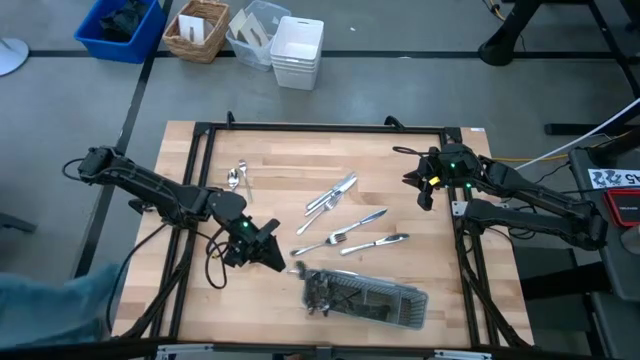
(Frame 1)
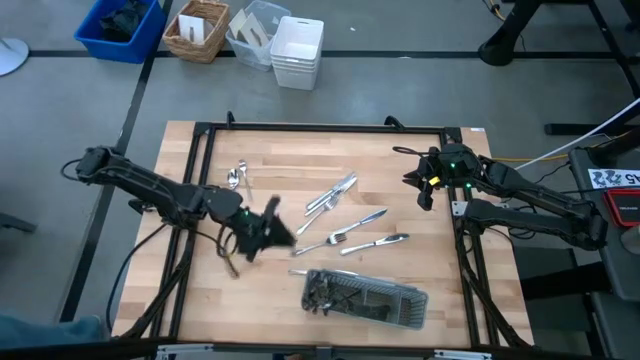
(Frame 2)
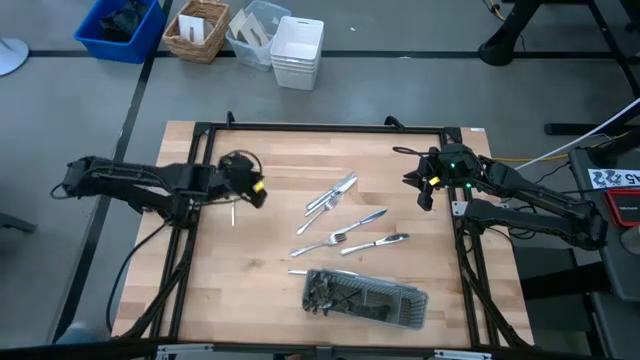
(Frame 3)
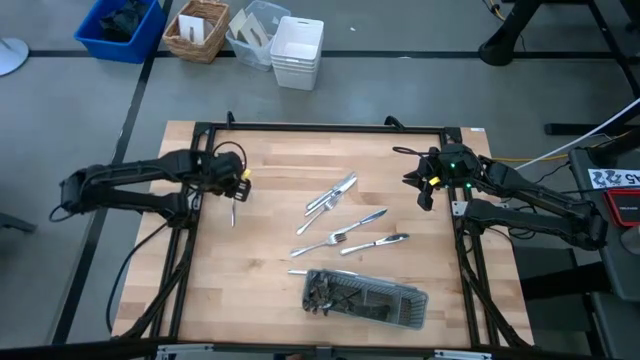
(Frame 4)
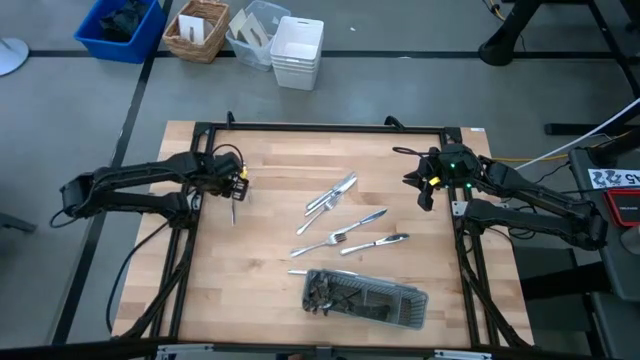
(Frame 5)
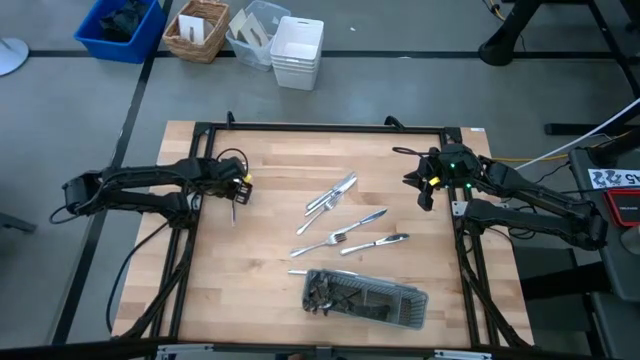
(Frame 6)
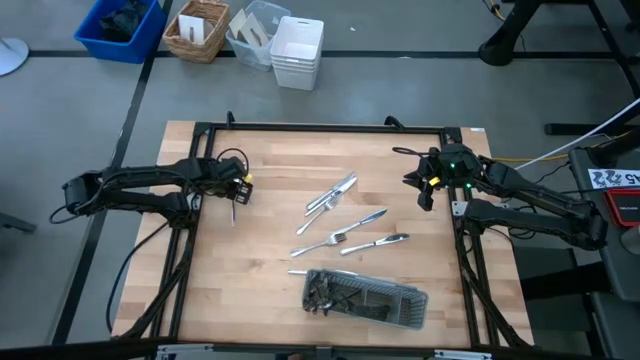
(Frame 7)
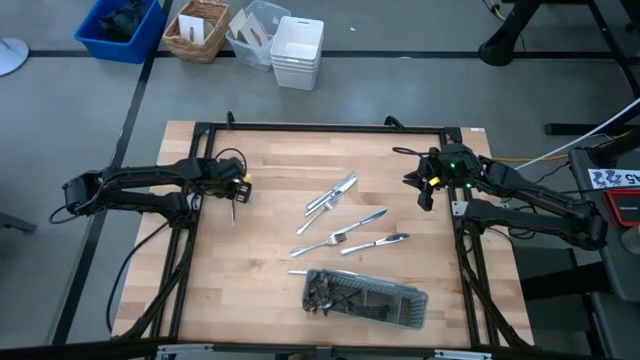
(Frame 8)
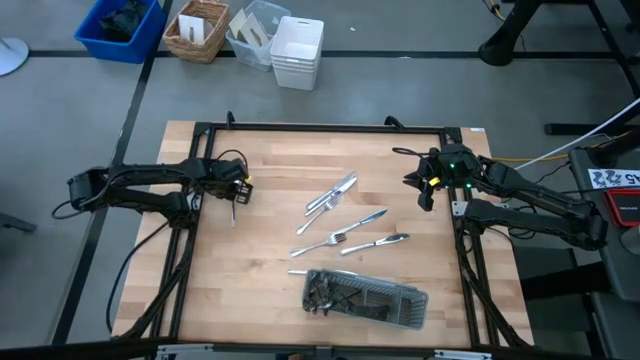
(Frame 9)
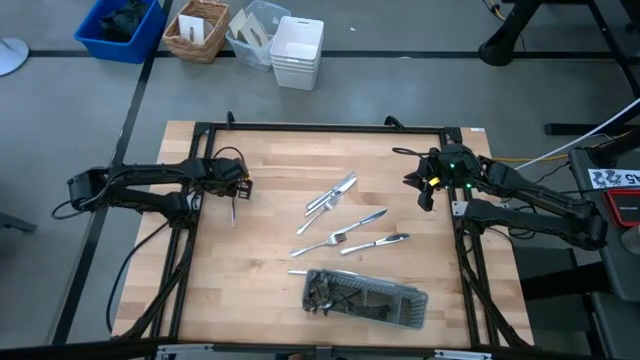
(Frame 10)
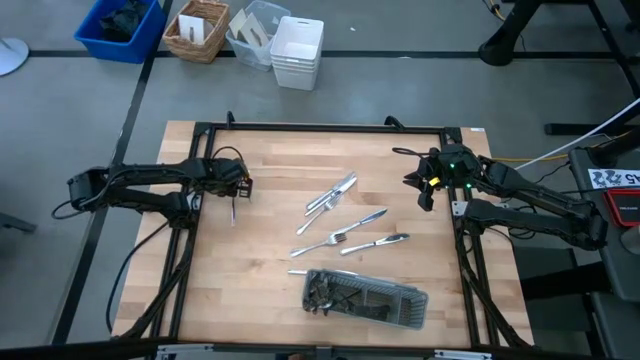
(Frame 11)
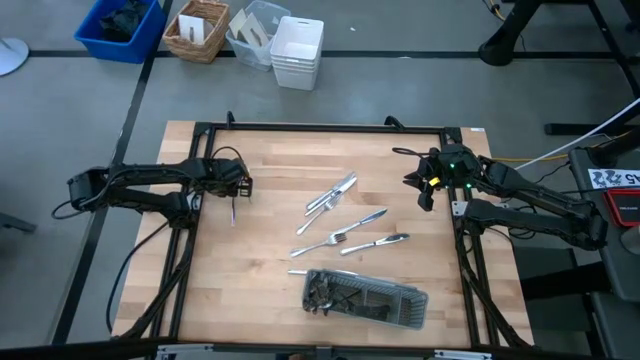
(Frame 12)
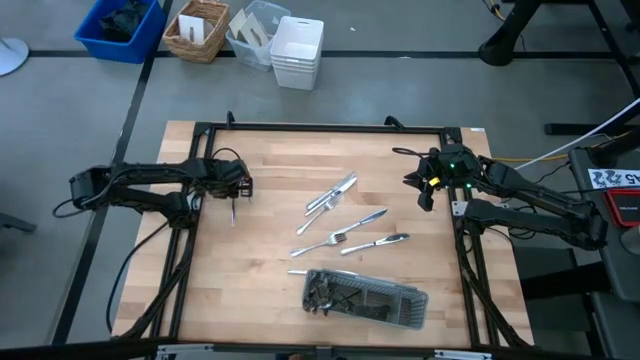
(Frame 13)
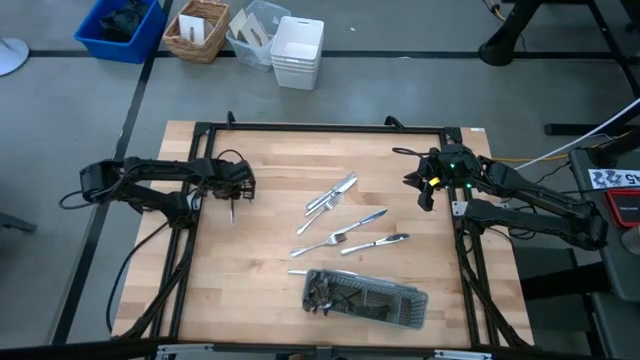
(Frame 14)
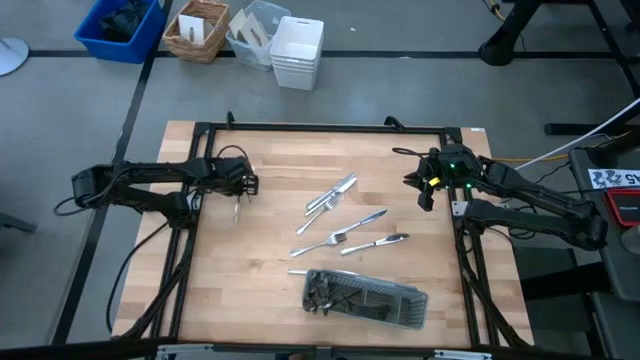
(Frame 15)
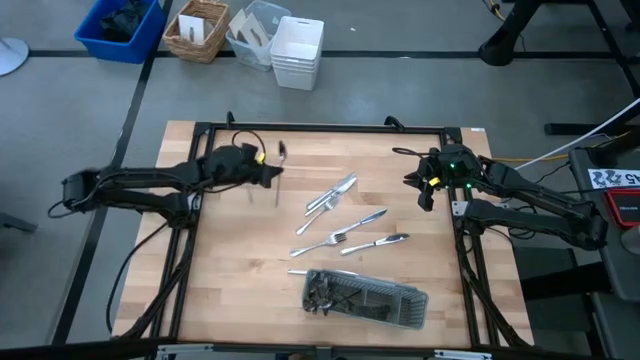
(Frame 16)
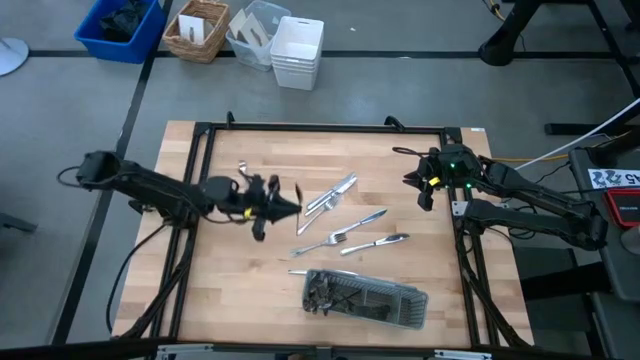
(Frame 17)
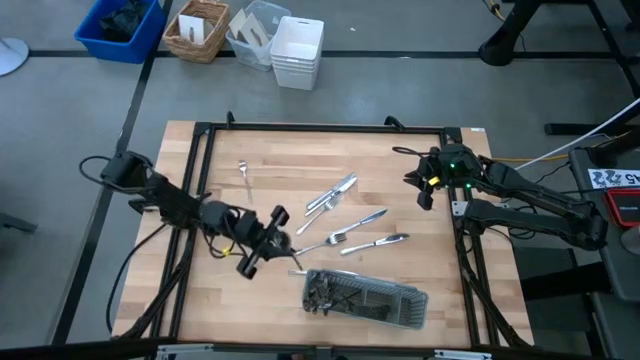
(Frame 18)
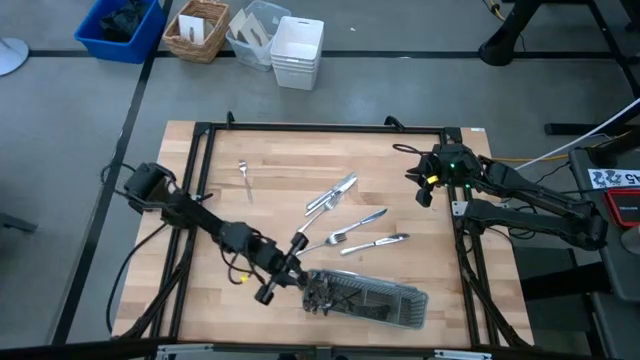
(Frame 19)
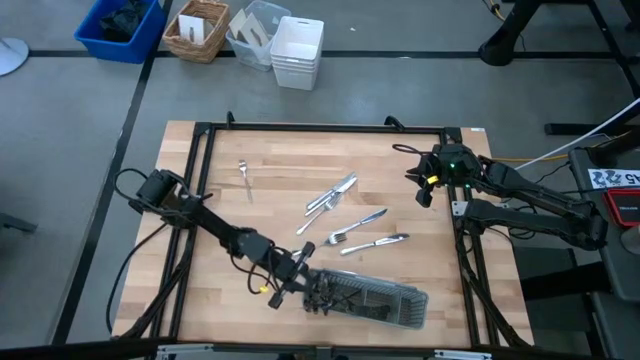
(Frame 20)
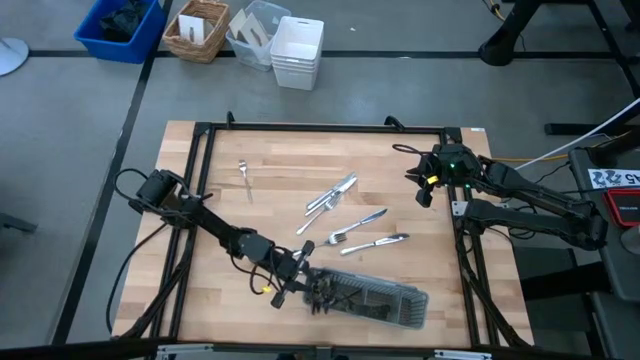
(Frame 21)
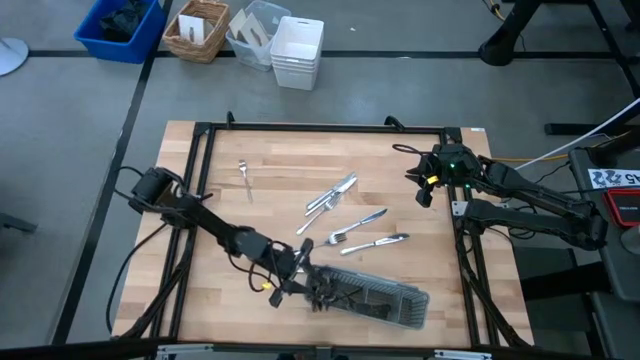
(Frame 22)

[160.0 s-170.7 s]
Task: Sort silverware
Put the spoon into the gray silverware rack

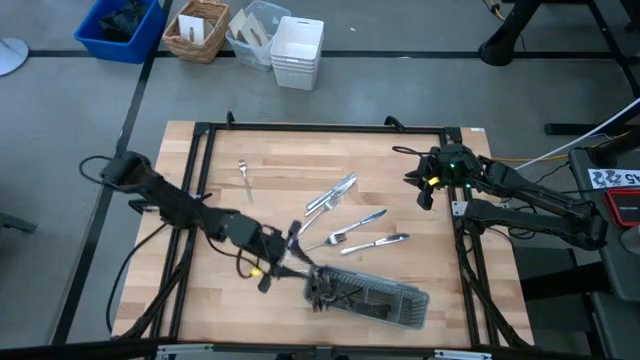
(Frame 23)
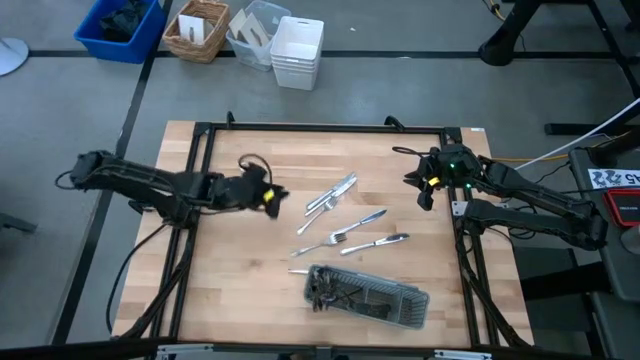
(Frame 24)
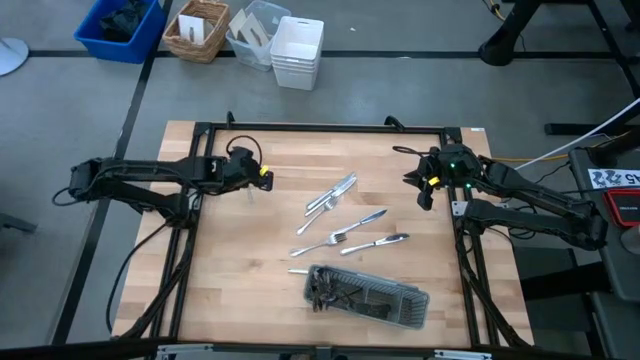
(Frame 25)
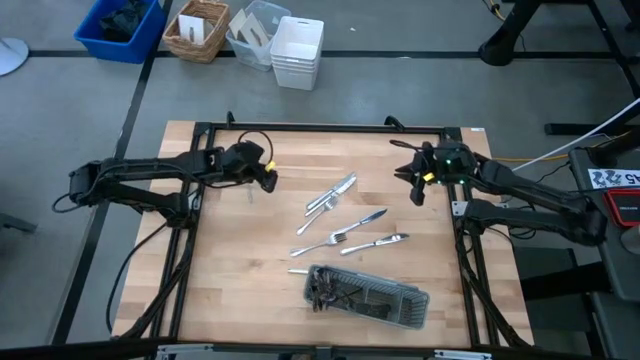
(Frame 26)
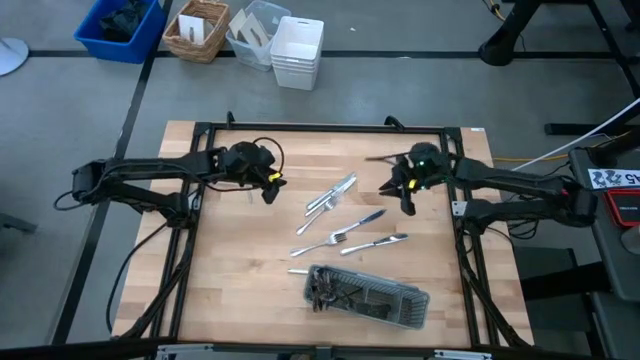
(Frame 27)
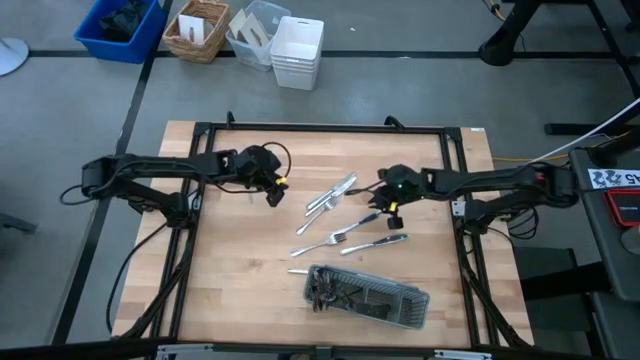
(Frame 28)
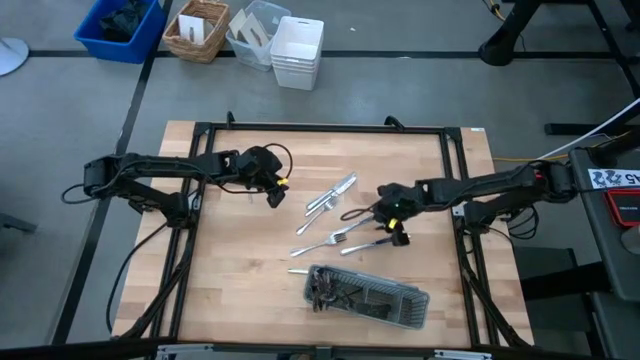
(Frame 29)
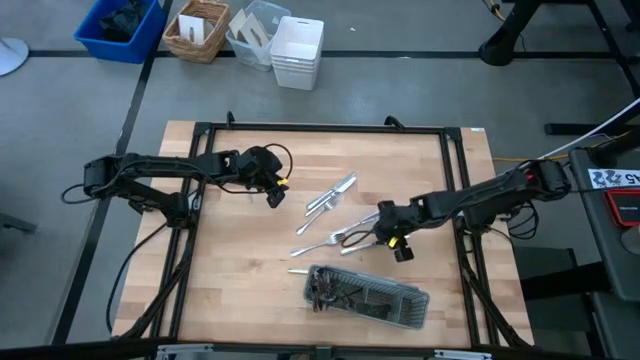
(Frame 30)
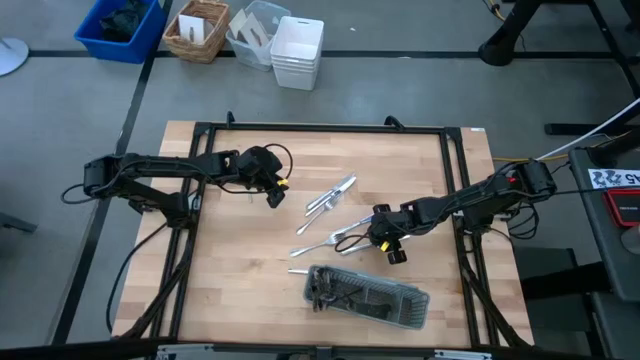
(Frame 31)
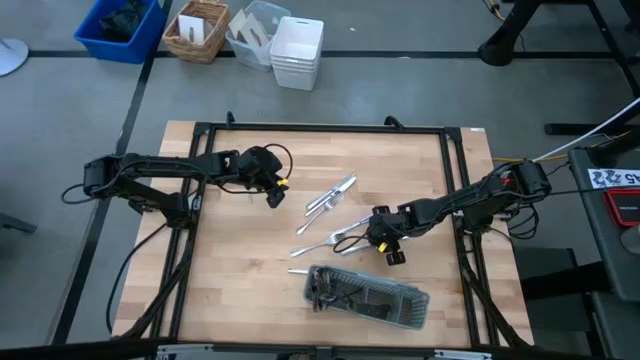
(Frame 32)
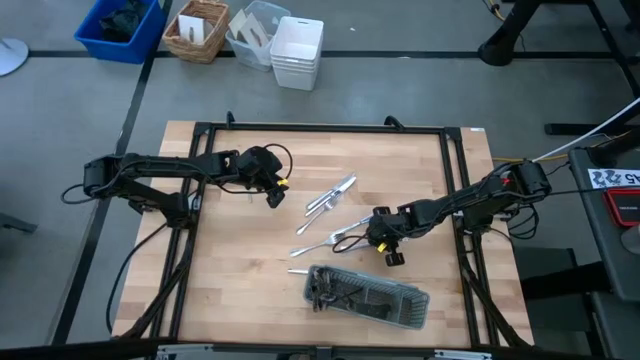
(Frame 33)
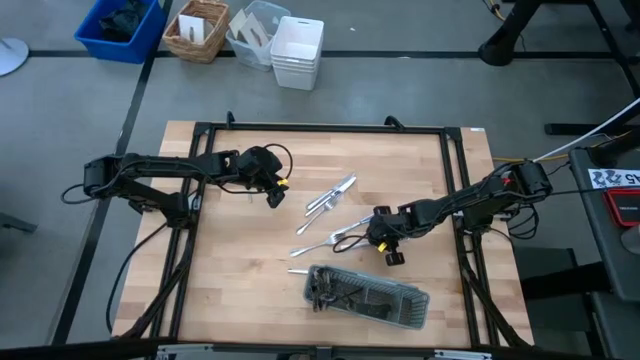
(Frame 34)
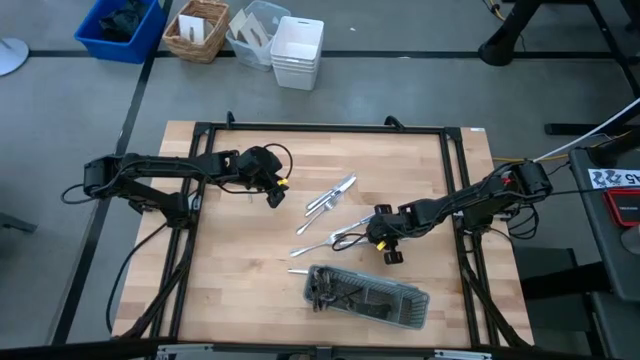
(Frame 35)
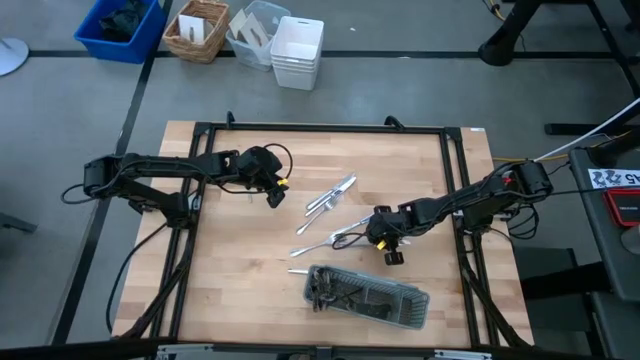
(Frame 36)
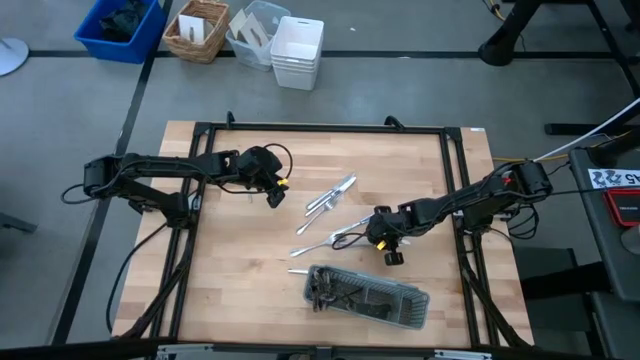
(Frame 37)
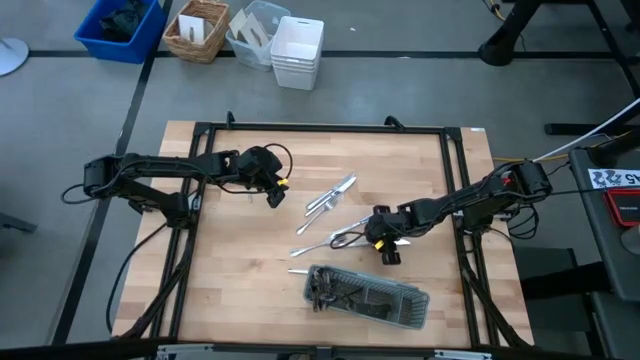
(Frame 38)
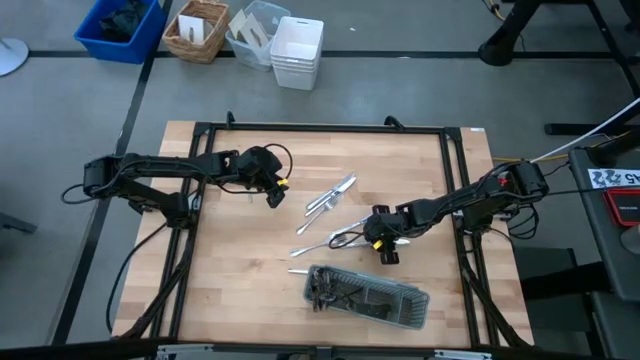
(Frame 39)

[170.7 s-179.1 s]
Put the knife into the gray silverware rack

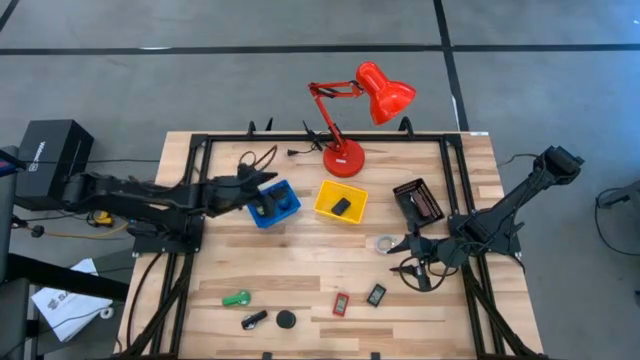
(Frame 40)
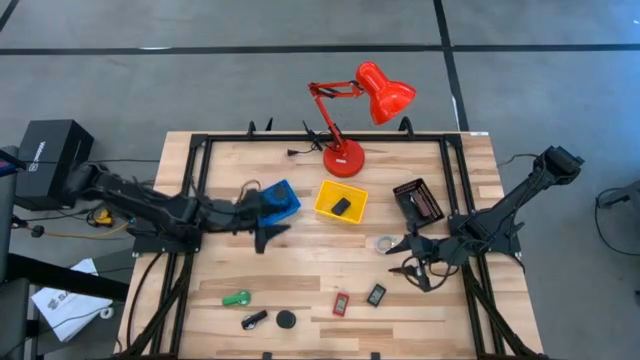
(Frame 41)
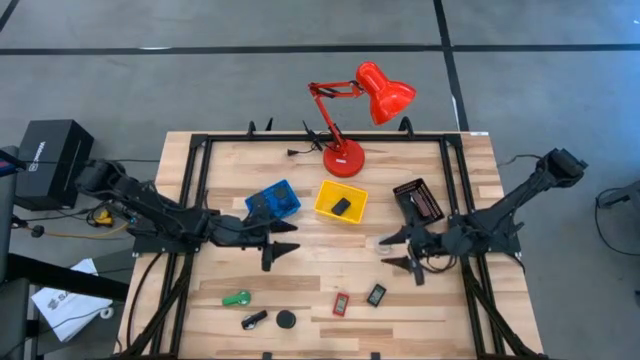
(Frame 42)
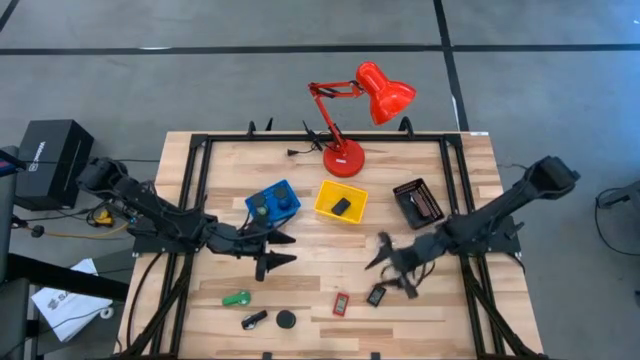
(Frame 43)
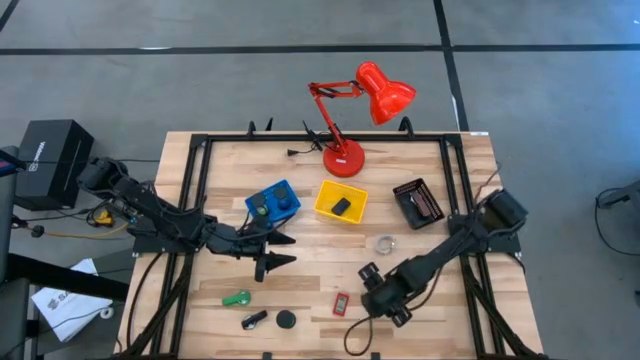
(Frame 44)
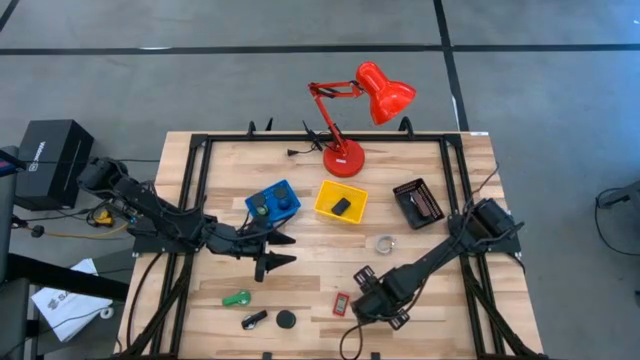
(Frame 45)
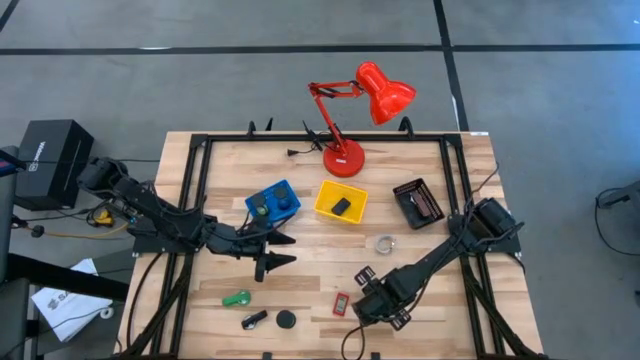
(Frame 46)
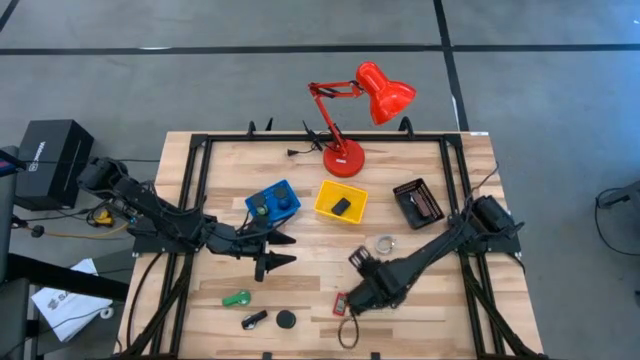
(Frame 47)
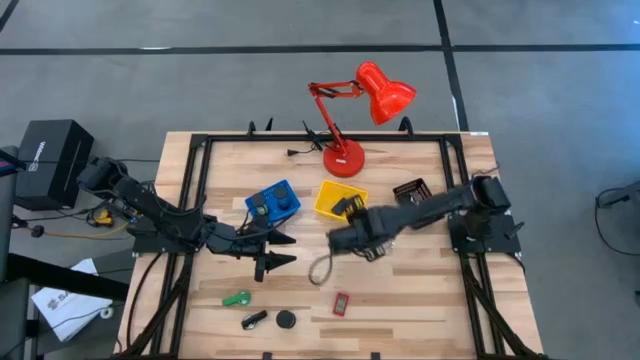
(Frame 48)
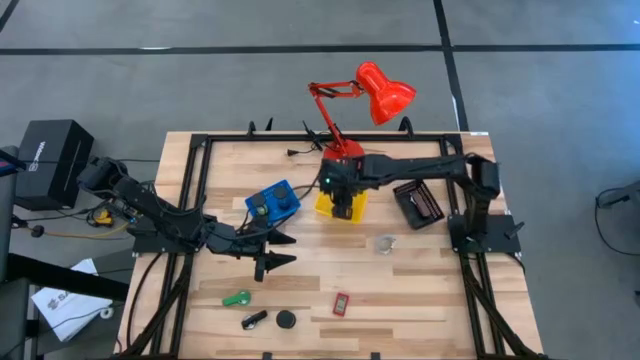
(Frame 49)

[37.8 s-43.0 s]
Task: Pick & Place Office items
Put the black digital clock into the yellow bin
